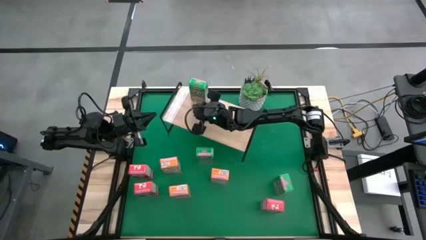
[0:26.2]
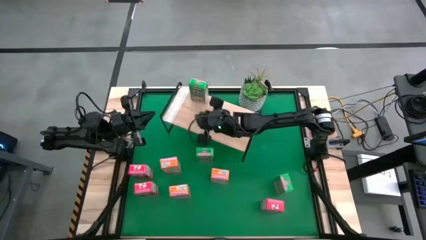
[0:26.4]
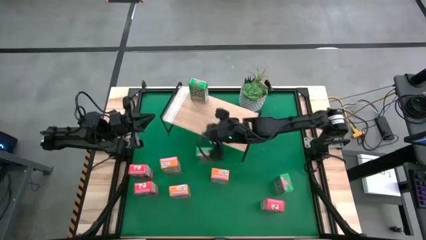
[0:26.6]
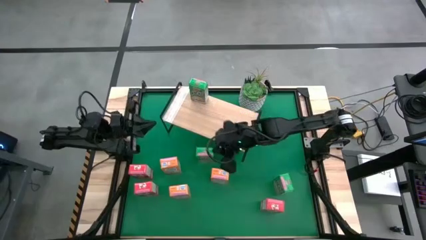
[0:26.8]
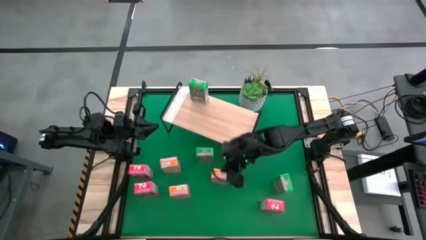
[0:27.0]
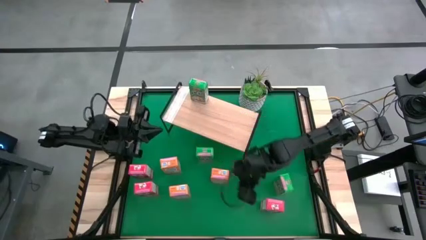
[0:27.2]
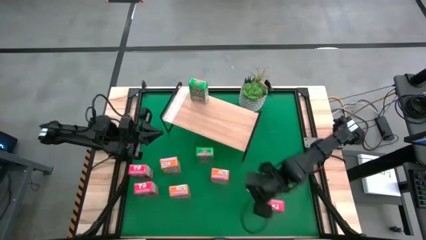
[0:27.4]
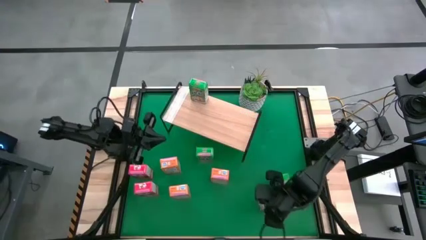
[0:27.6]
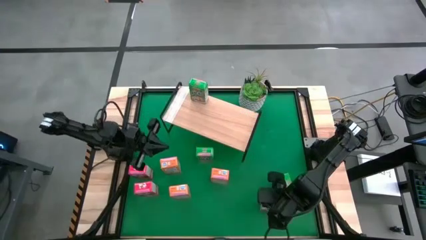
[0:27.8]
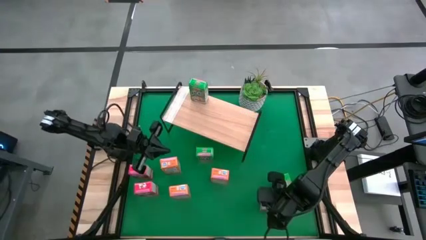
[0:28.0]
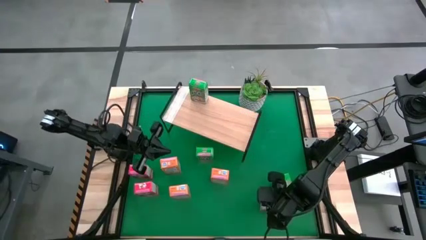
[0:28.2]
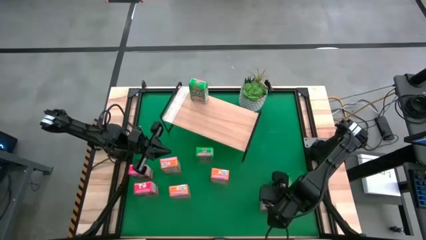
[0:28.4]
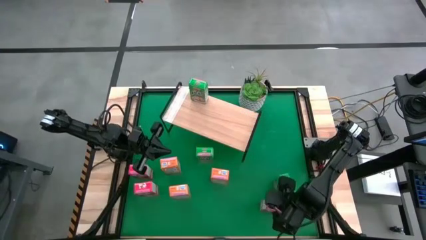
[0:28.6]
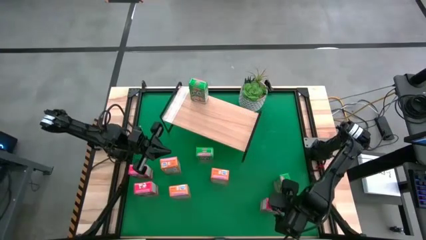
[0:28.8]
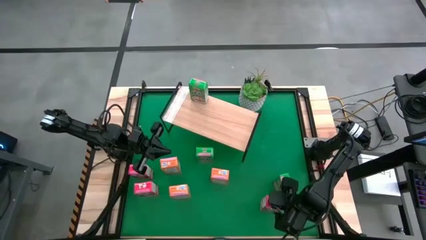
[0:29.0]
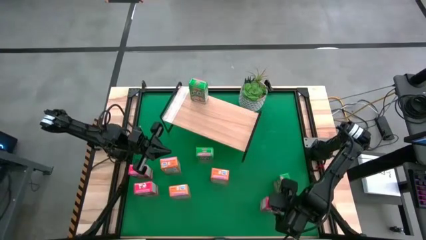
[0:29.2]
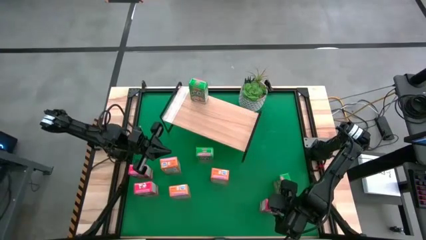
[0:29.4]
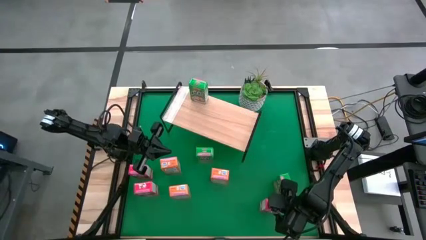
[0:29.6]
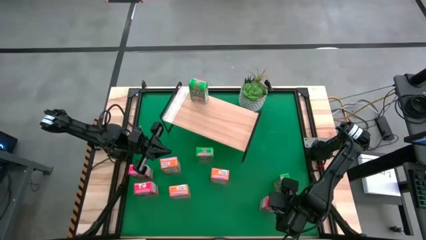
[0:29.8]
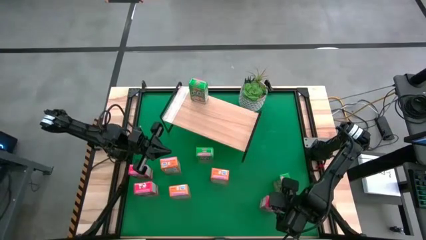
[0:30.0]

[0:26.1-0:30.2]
Task: Stack cereal on shelf
Put the bottom right red cereal box on the shelf

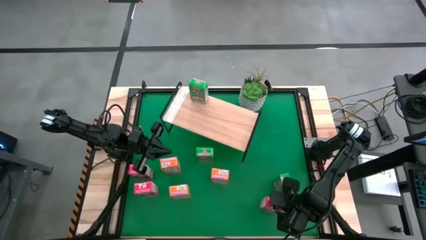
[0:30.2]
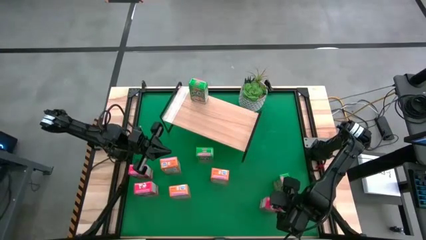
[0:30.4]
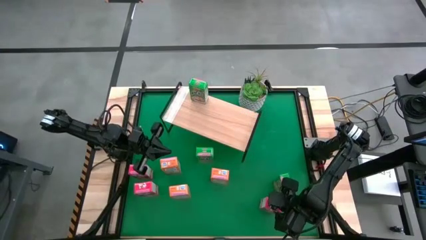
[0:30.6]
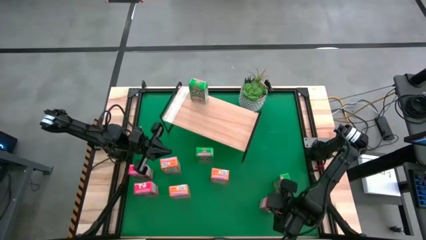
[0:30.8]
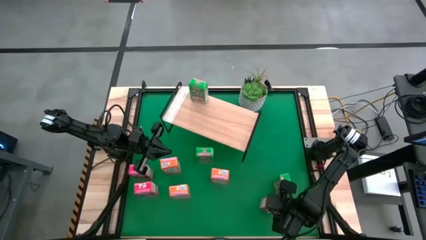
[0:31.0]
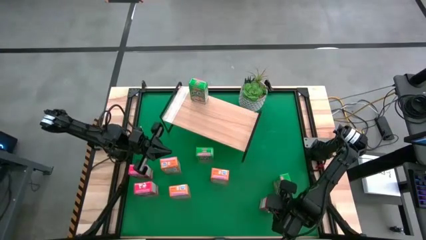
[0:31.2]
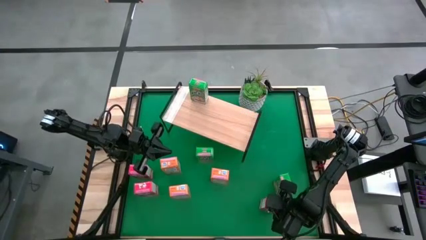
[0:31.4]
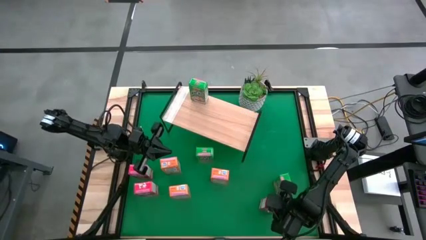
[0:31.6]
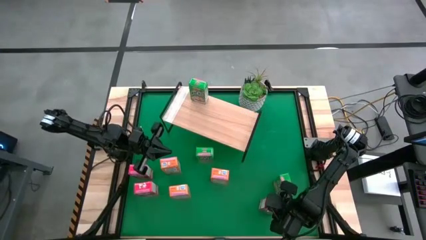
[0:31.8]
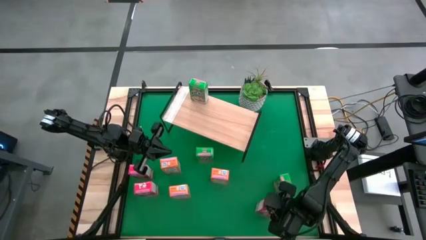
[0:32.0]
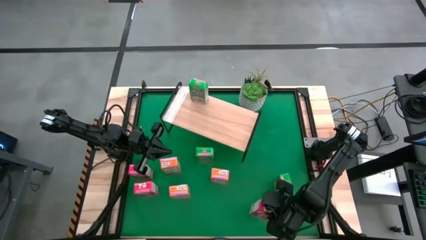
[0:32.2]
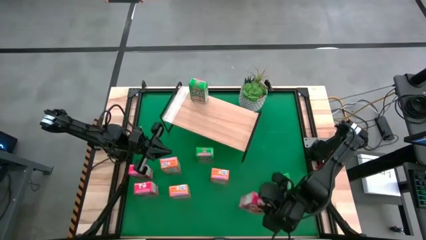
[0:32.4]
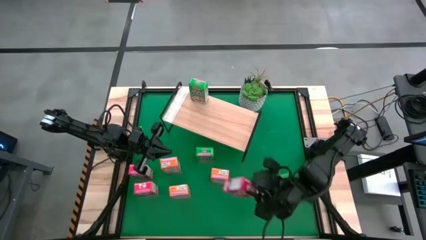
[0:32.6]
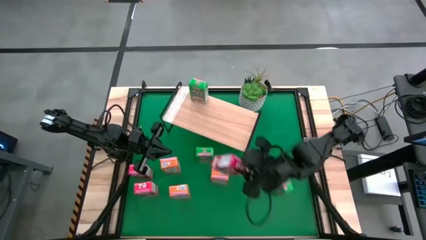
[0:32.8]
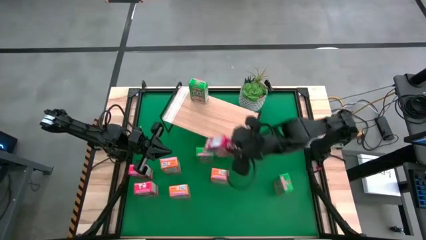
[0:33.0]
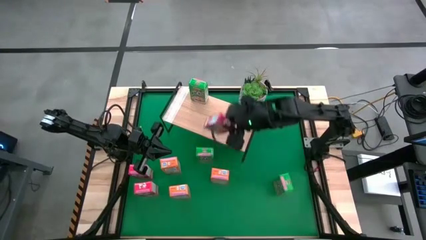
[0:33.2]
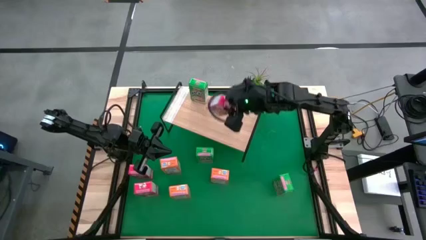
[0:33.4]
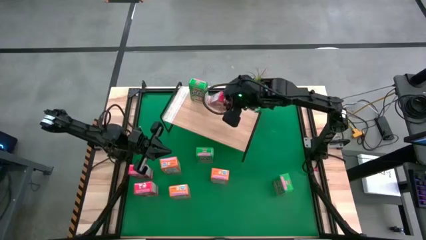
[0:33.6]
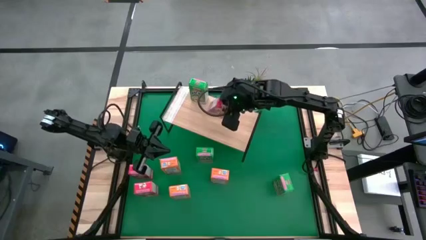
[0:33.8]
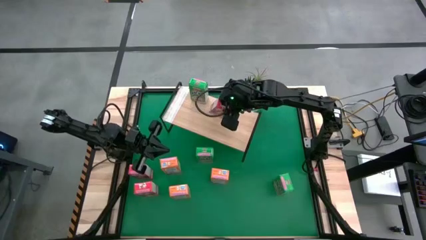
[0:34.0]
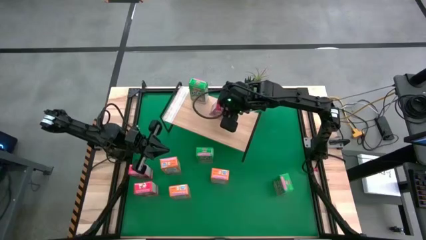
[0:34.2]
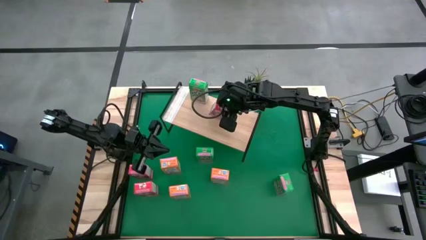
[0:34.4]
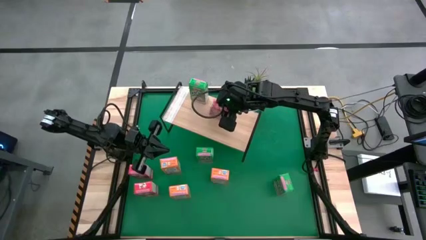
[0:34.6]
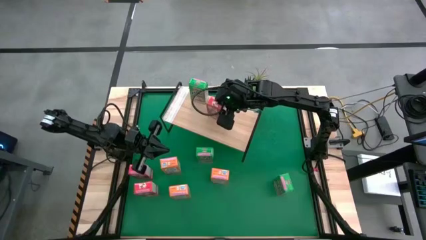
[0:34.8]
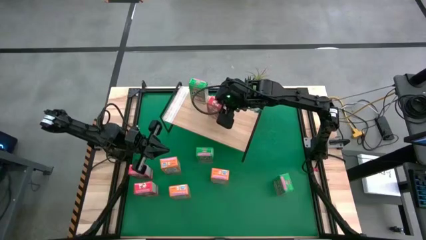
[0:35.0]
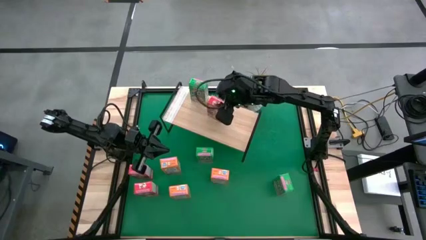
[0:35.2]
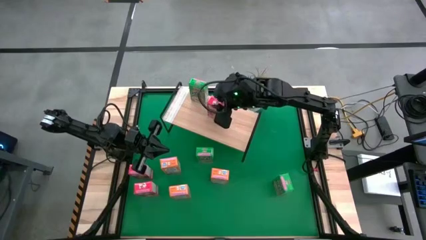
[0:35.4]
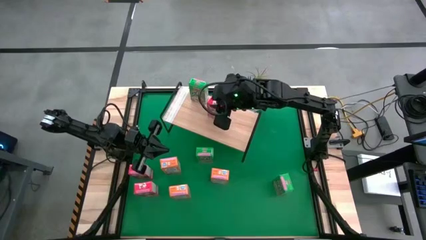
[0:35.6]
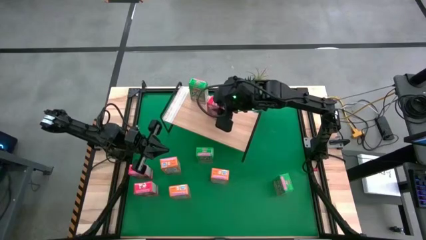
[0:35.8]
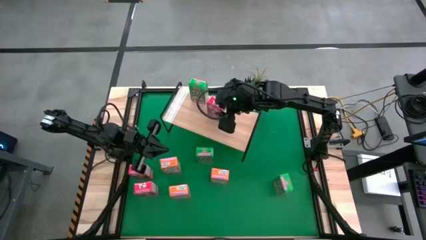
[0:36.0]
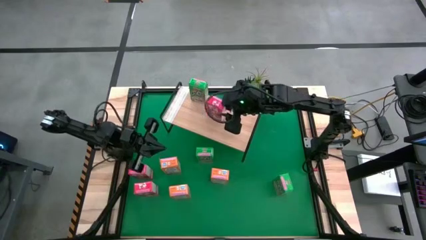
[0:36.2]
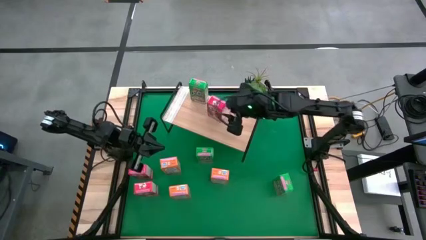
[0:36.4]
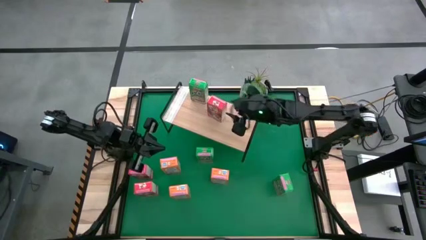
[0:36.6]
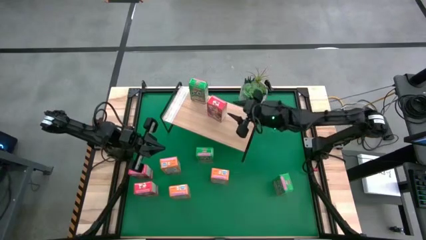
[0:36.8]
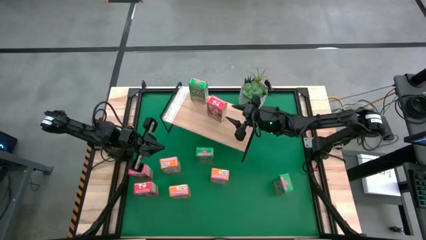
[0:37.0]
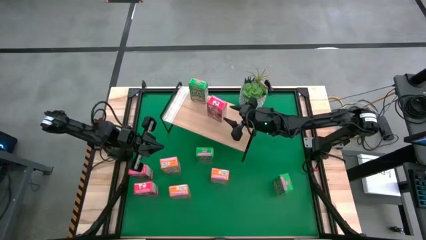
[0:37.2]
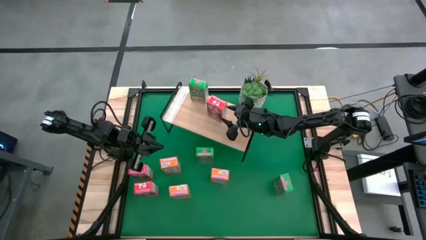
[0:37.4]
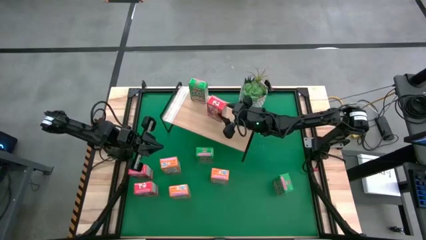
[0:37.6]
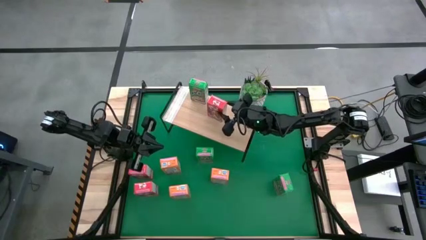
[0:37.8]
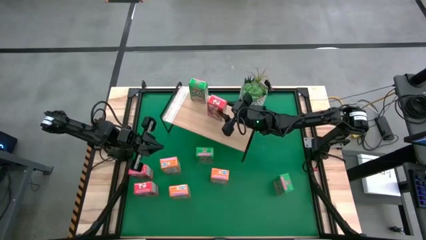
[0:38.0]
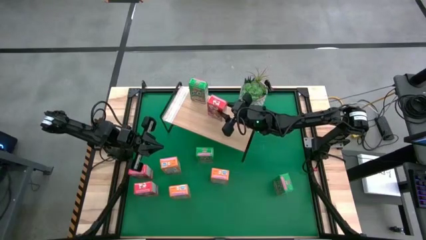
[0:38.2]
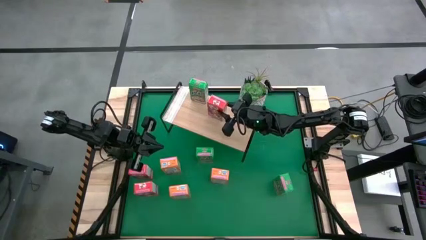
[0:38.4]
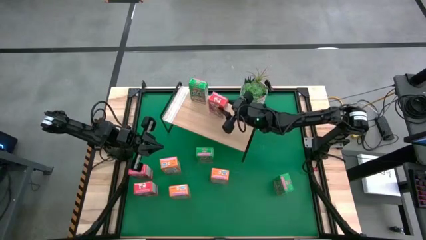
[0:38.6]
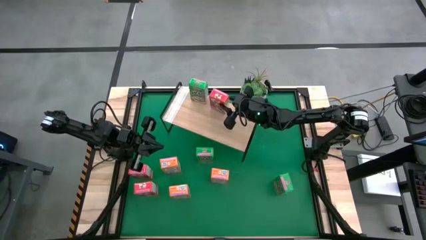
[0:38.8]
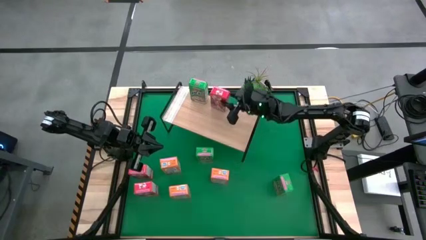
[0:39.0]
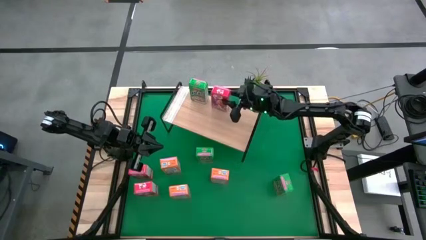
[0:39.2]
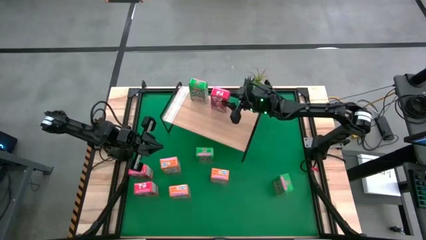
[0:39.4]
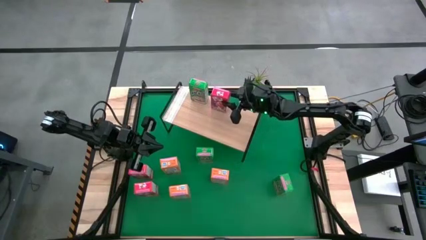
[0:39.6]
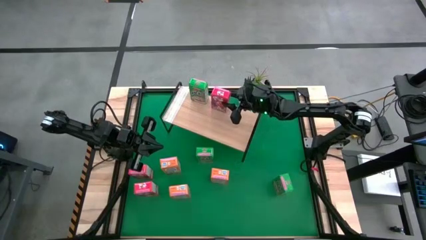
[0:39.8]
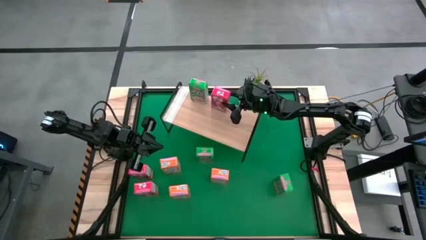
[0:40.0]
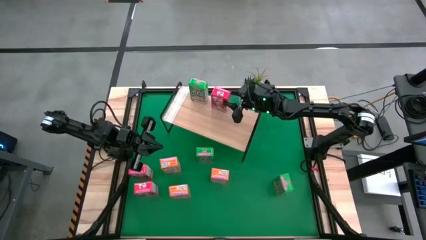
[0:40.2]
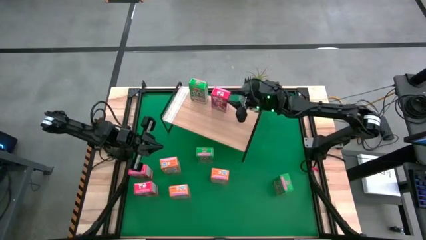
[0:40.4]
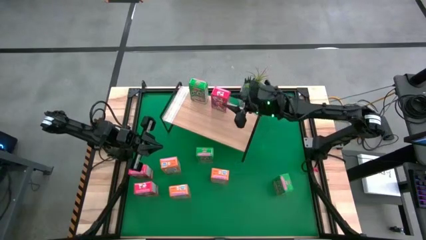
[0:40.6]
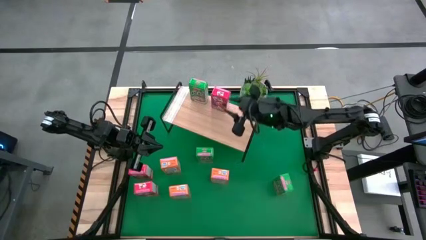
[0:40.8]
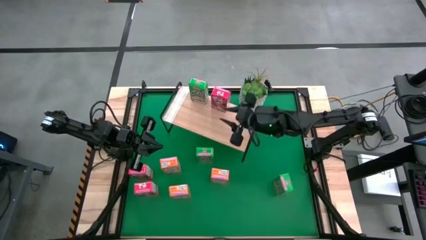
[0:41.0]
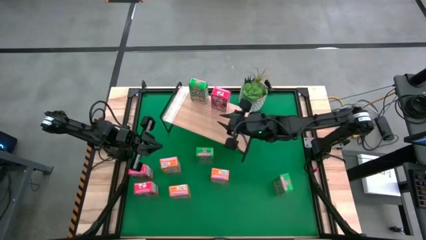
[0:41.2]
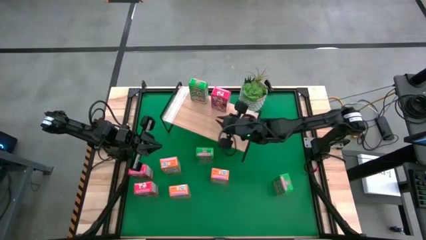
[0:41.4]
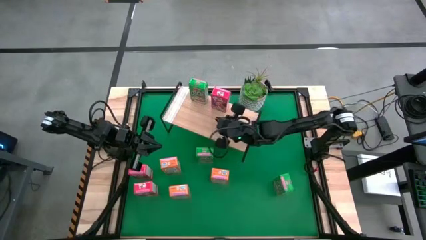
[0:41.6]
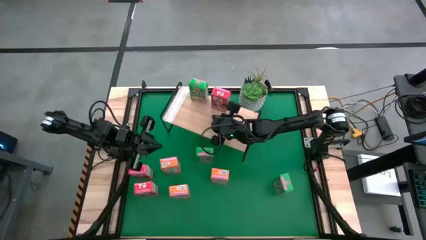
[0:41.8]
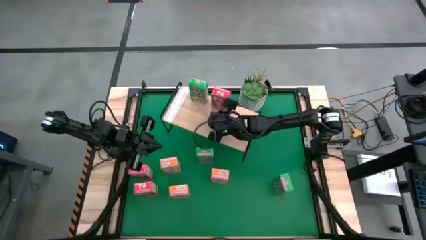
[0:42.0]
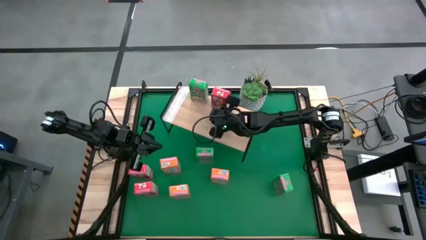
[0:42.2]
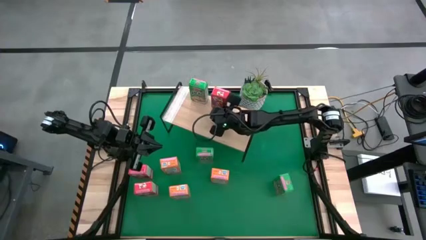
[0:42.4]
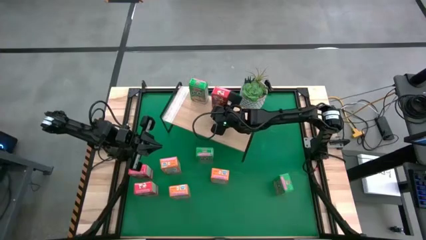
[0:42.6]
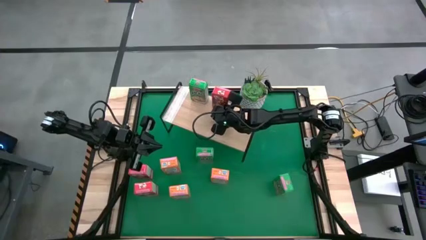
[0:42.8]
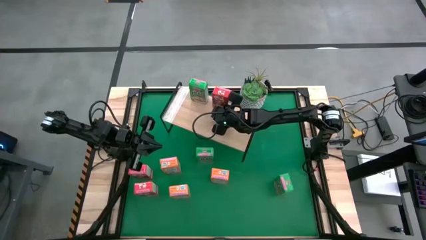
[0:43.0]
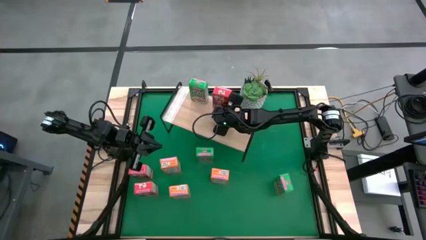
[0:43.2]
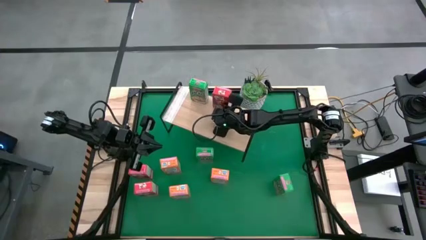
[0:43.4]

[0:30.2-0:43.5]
Put the bottom right red cereal box on the shelf
